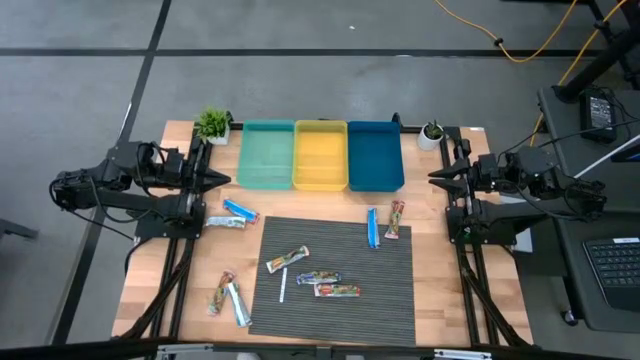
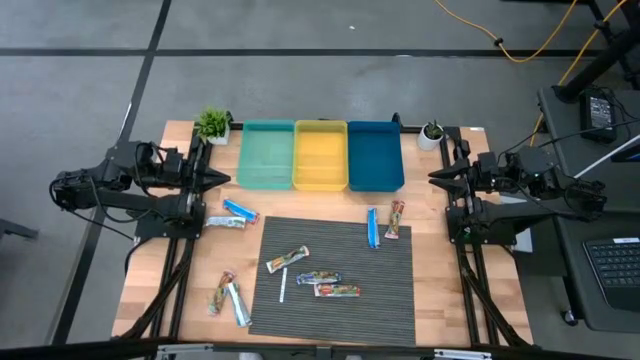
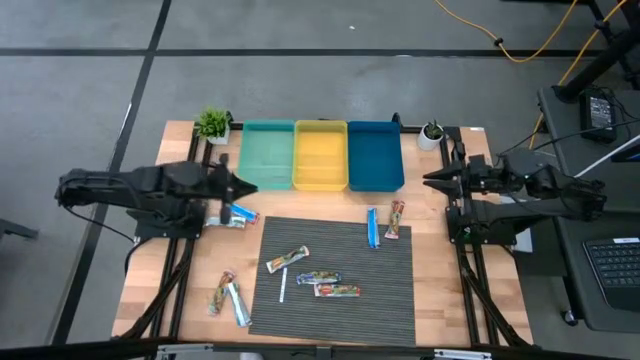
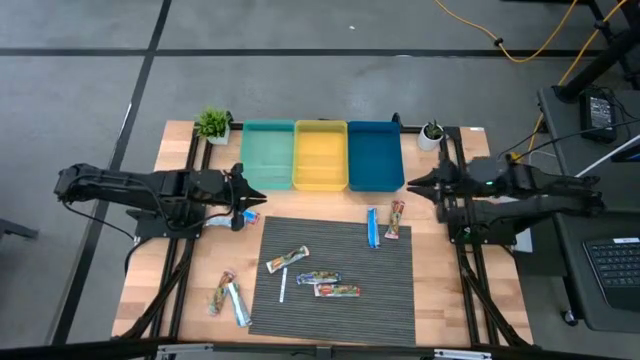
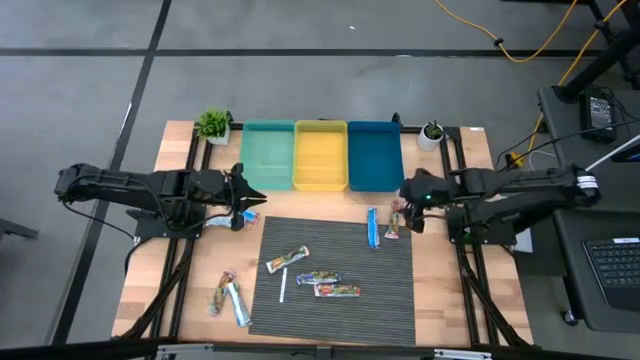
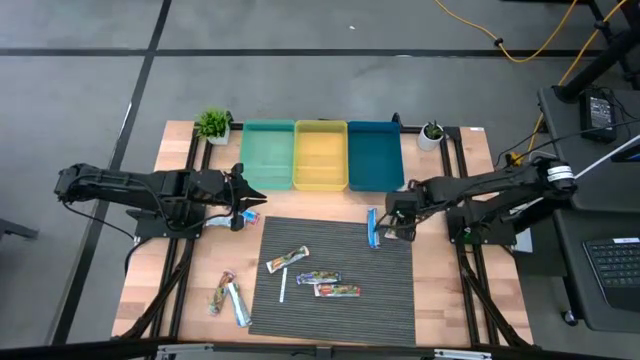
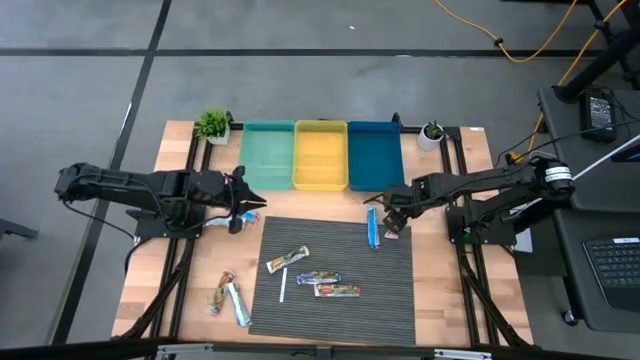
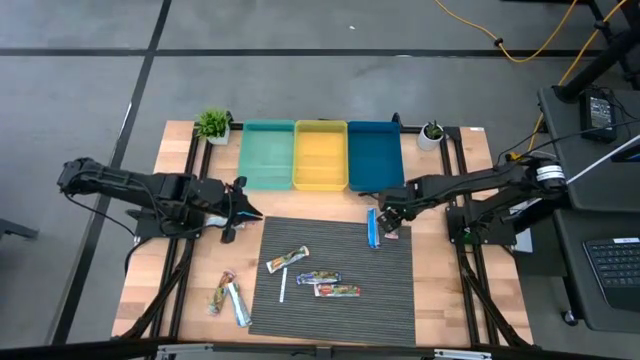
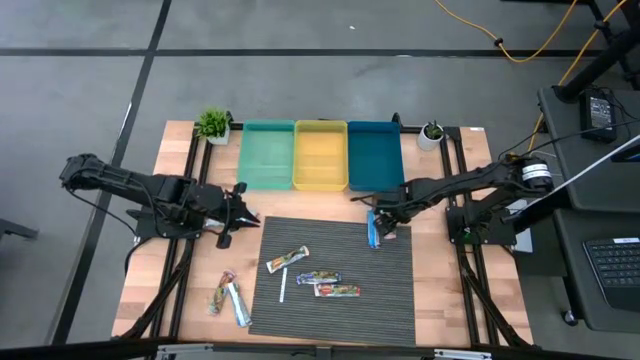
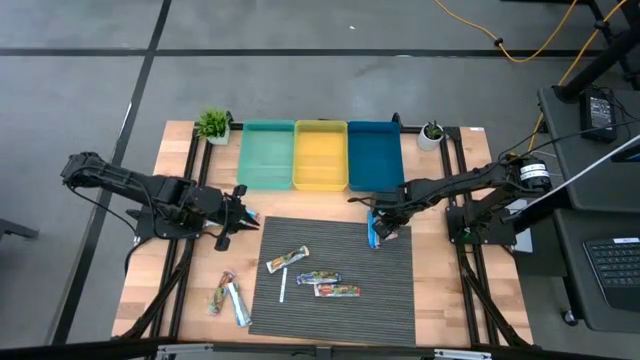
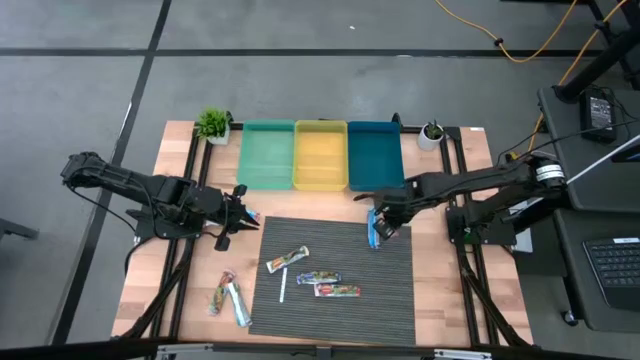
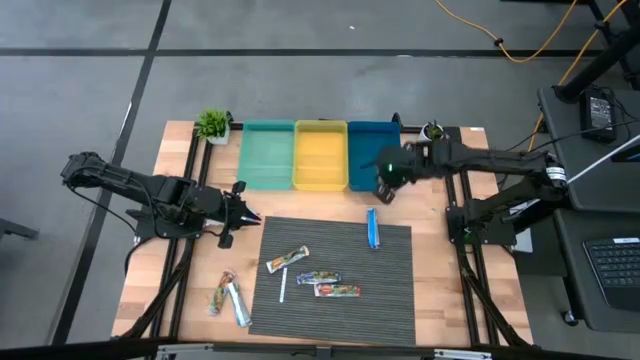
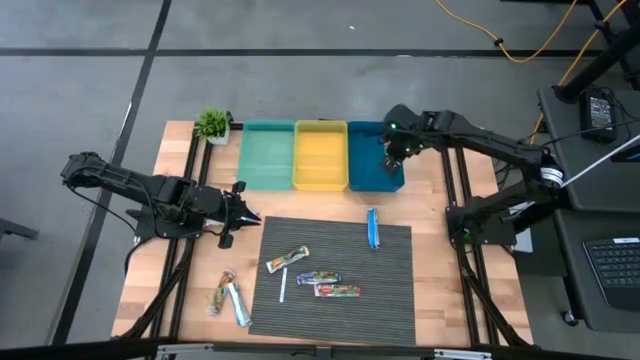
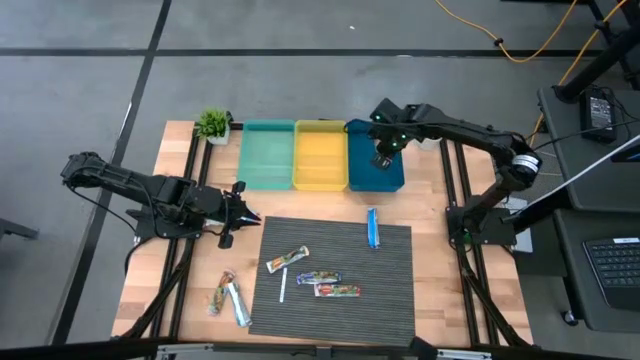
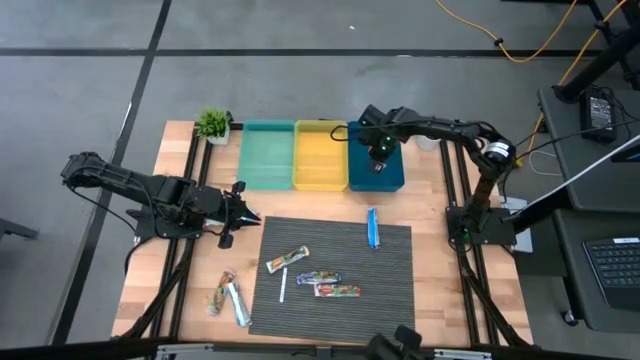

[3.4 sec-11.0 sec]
Task: Pick and place Granola Bars by type
Put the red granola bar into the blue bin

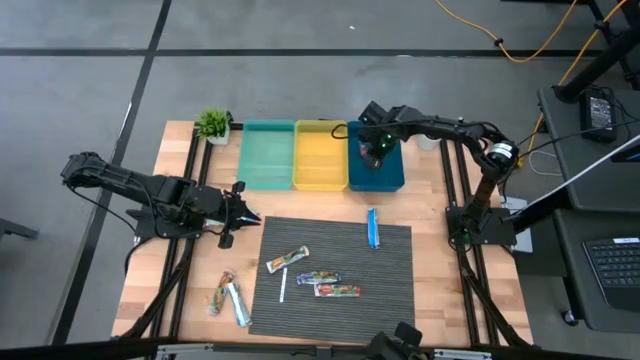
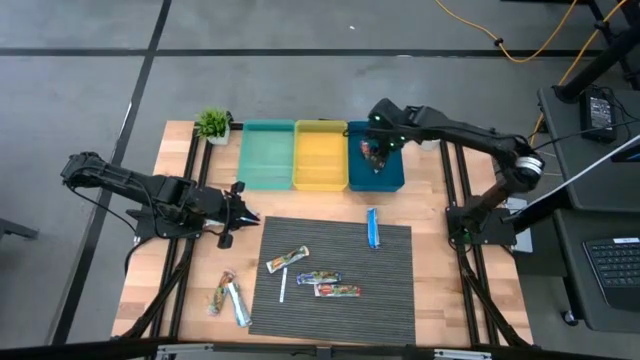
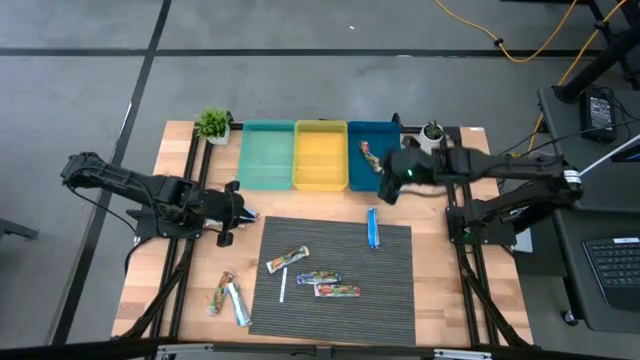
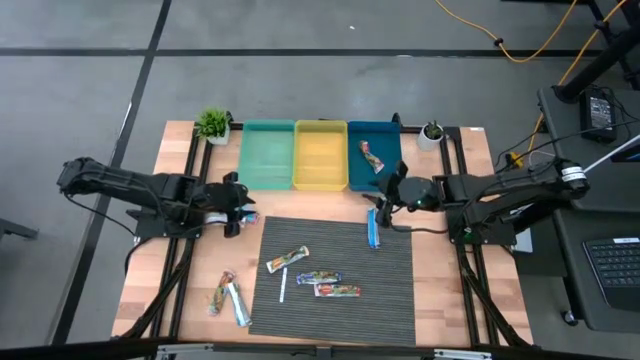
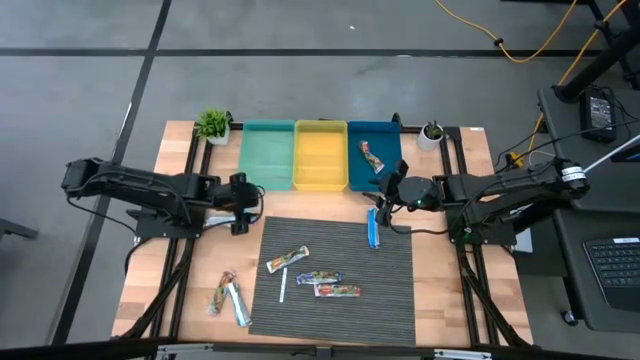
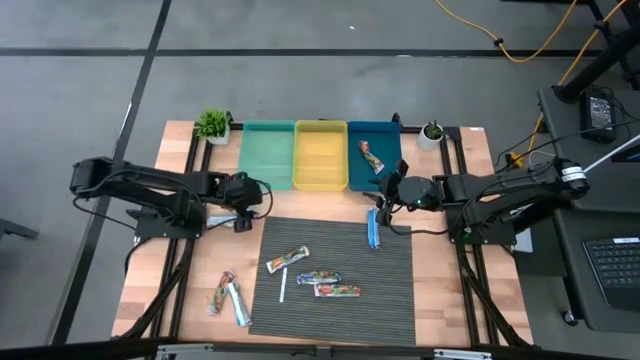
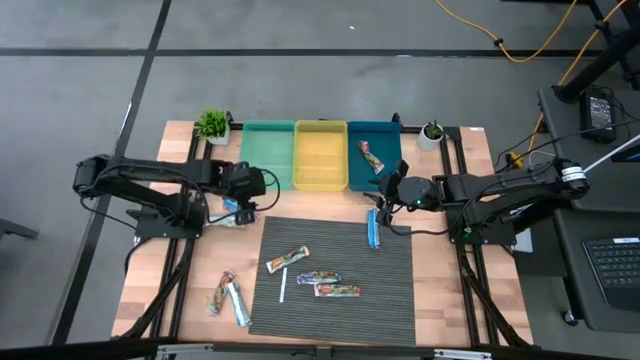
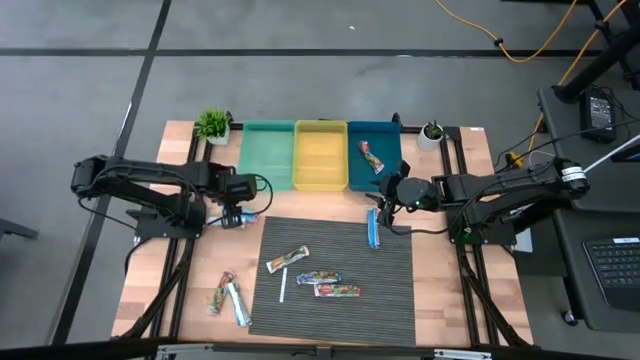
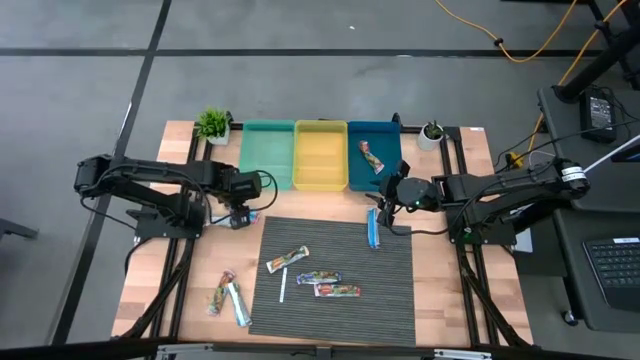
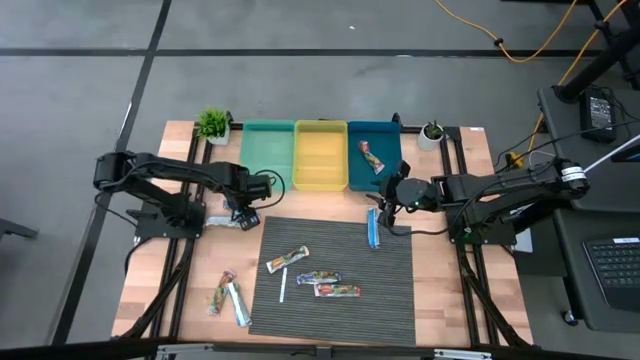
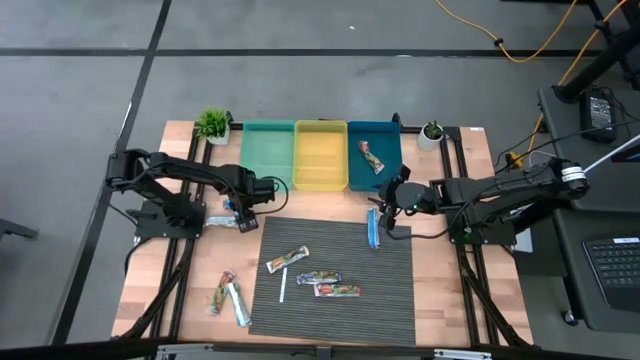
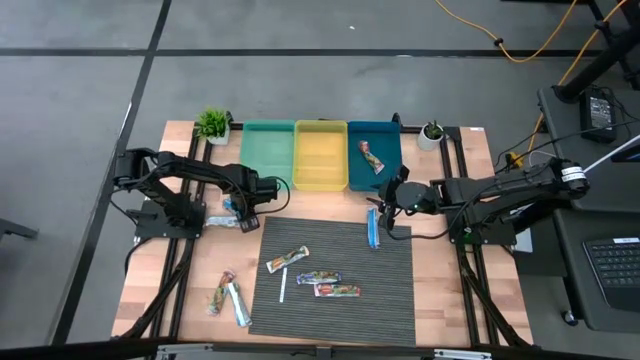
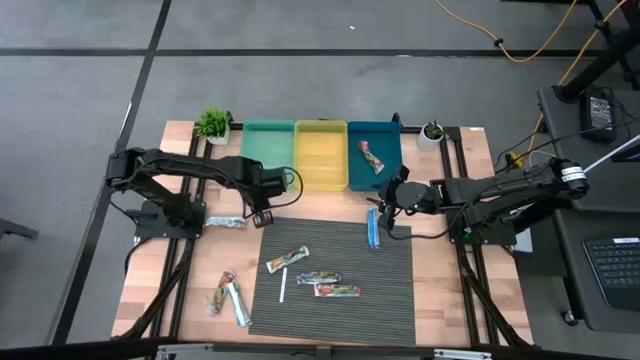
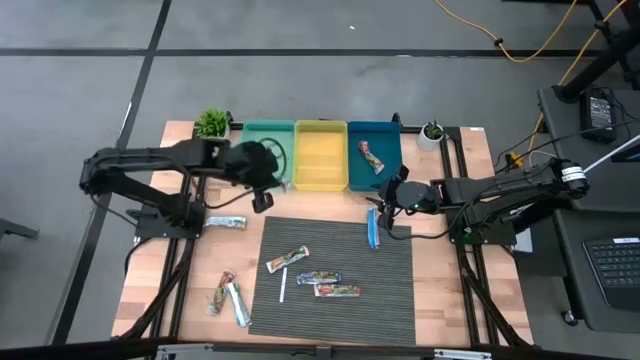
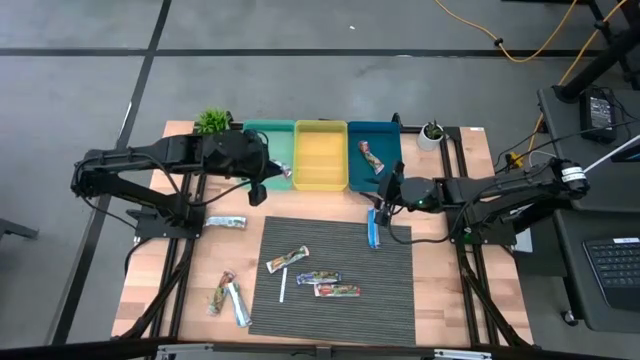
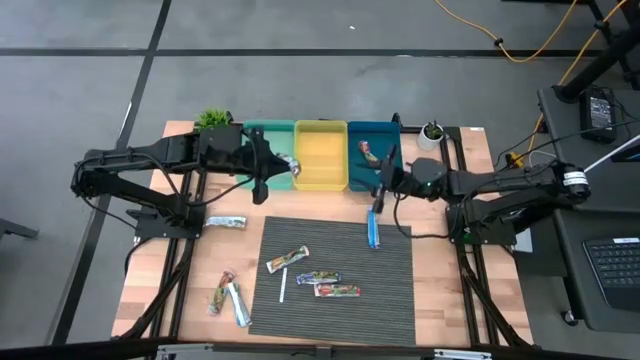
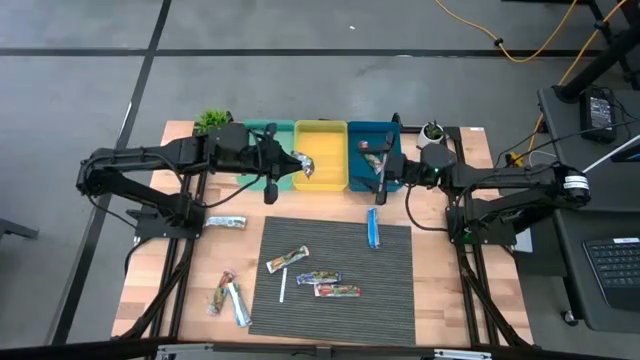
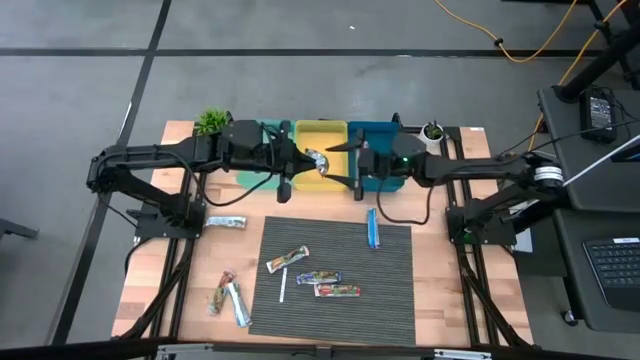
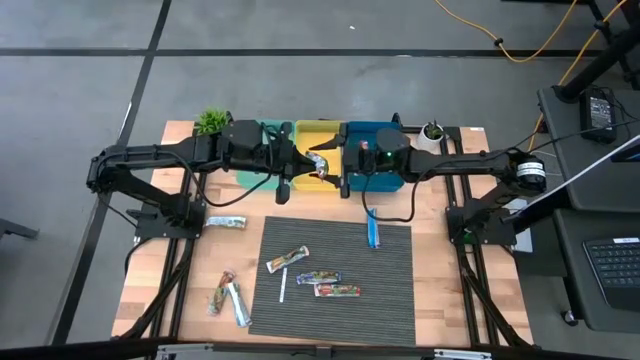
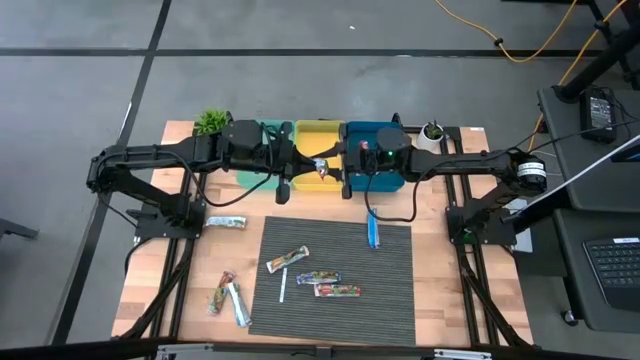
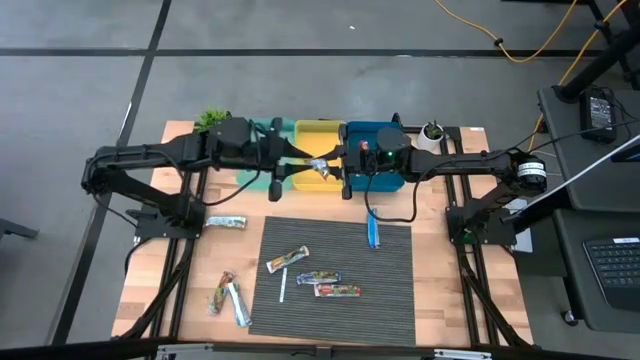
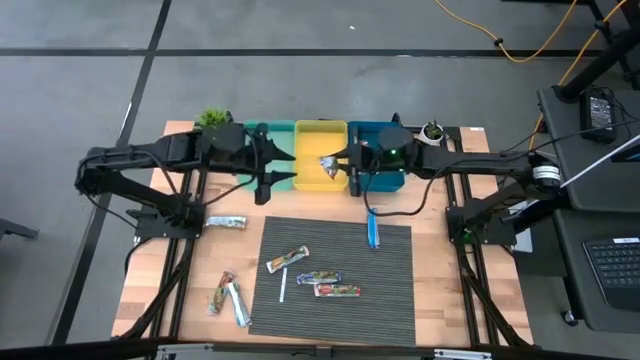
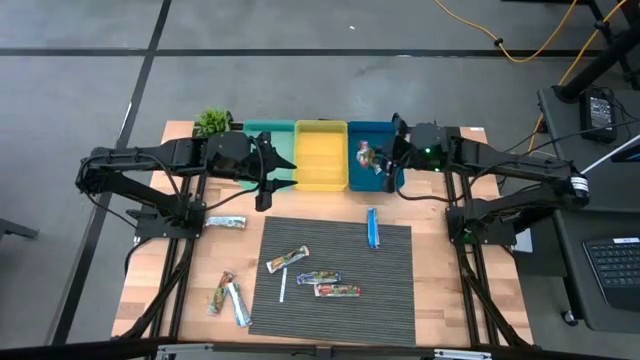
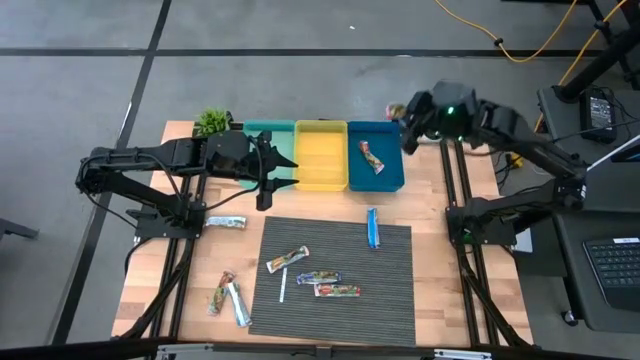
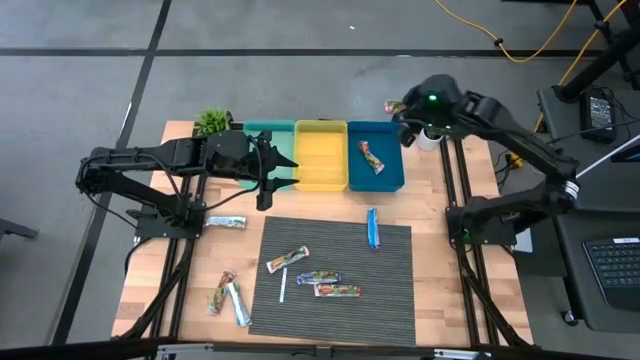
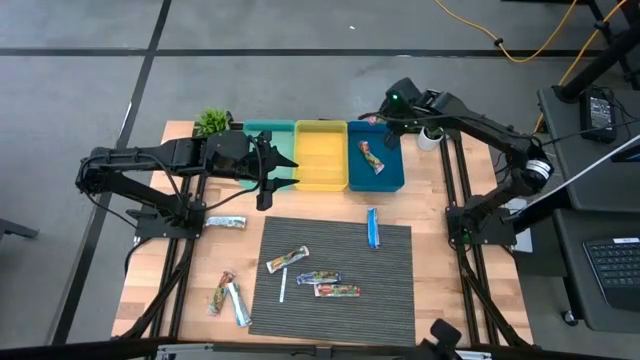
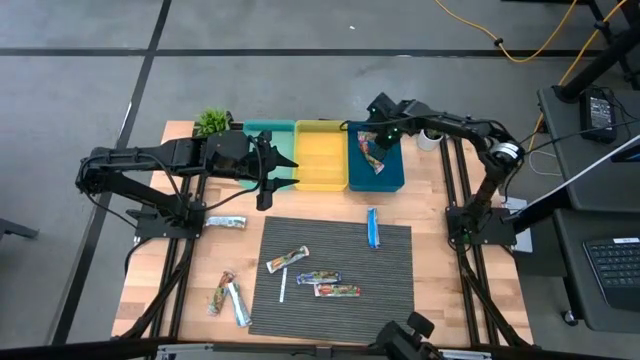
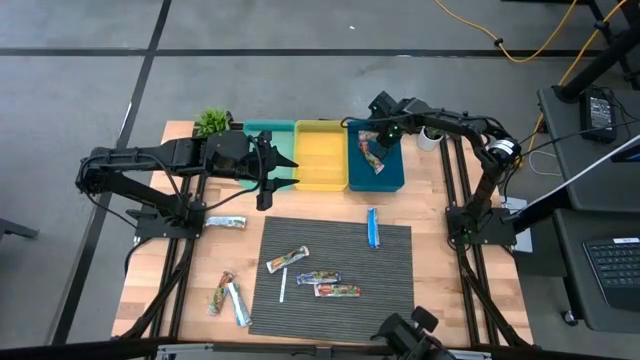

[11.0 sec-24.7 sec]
Put the red granola bar into the blue bin
